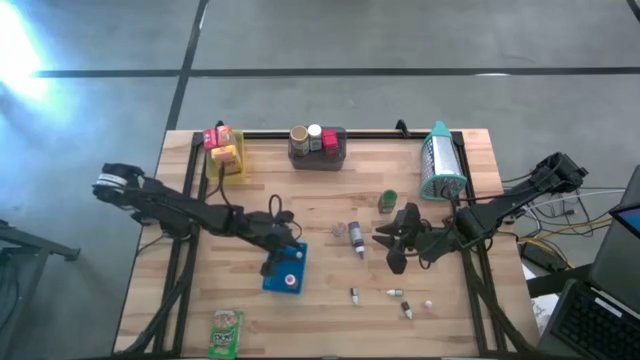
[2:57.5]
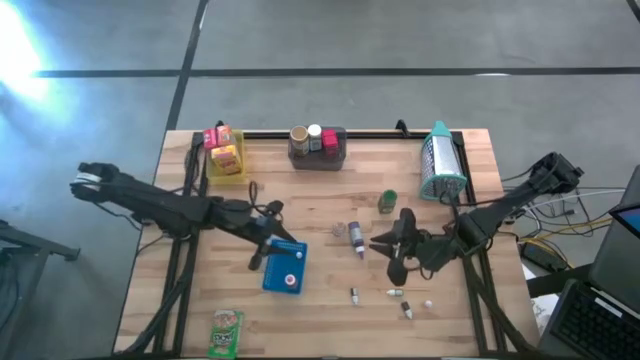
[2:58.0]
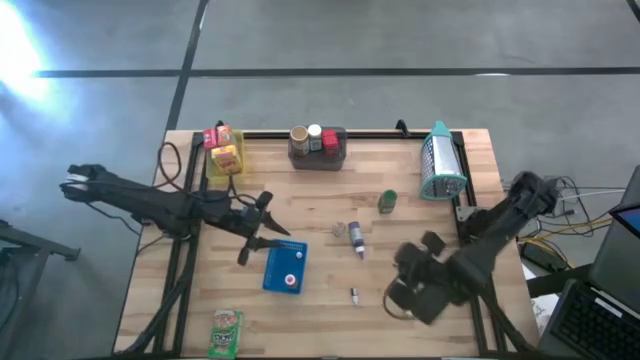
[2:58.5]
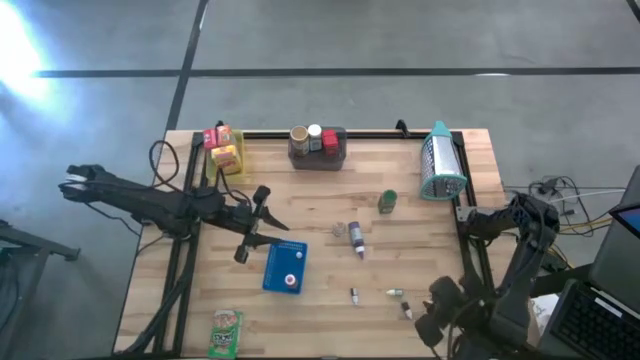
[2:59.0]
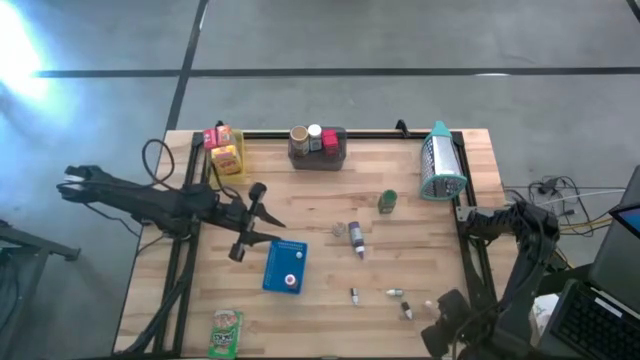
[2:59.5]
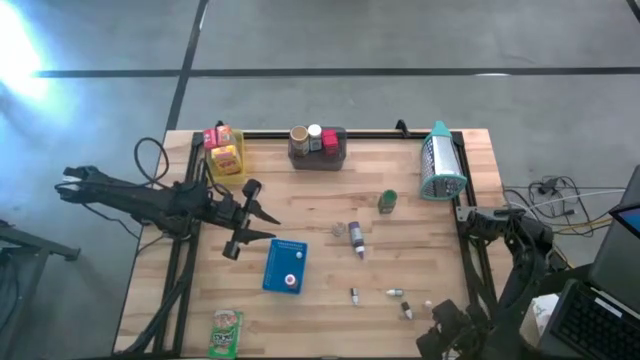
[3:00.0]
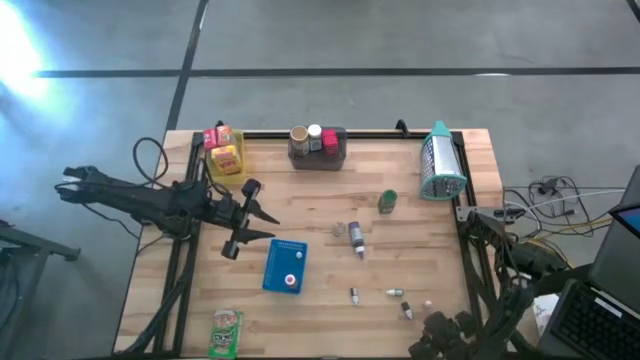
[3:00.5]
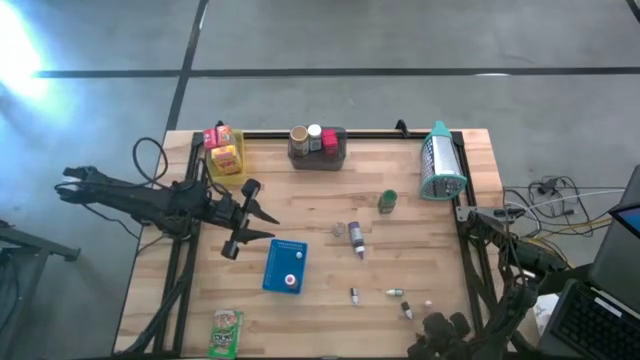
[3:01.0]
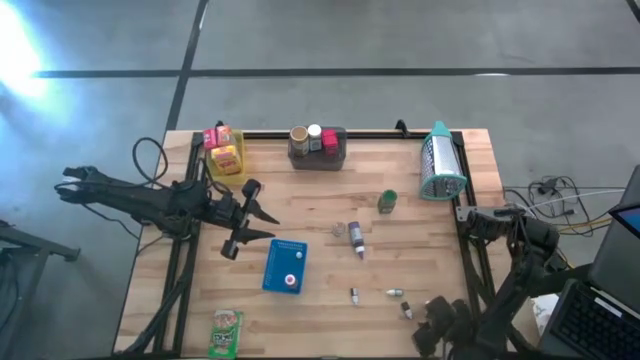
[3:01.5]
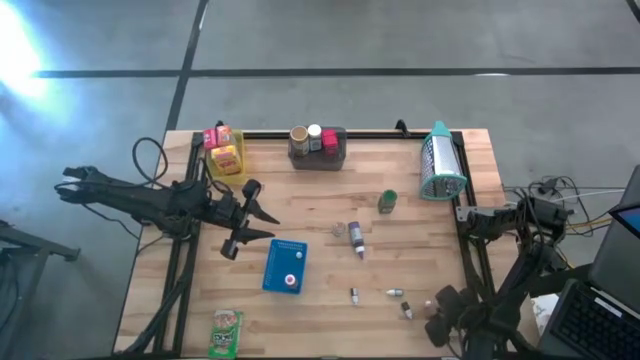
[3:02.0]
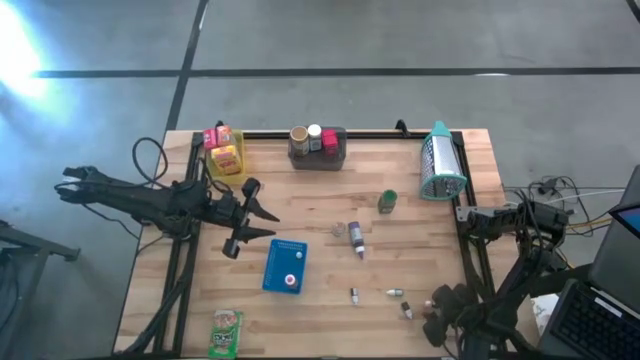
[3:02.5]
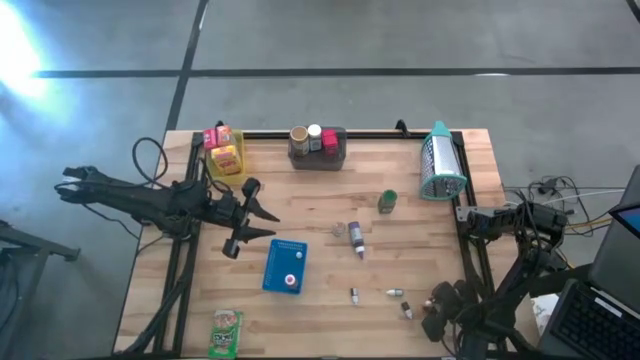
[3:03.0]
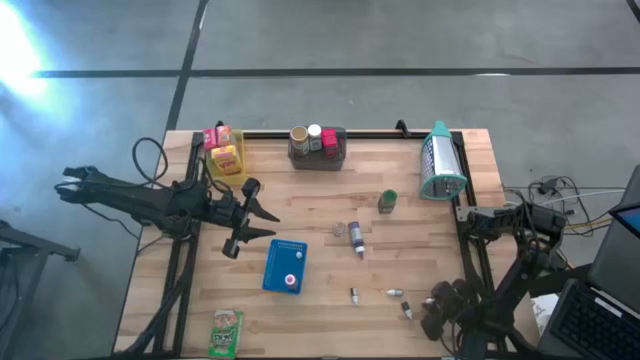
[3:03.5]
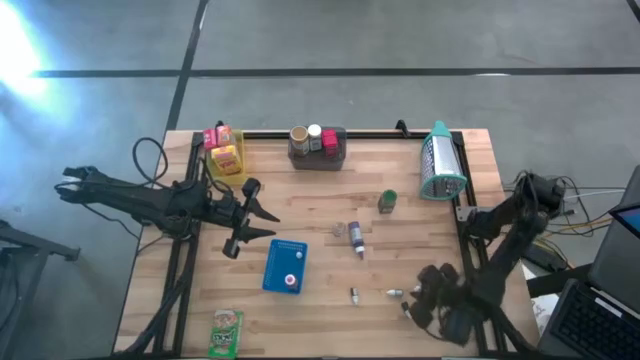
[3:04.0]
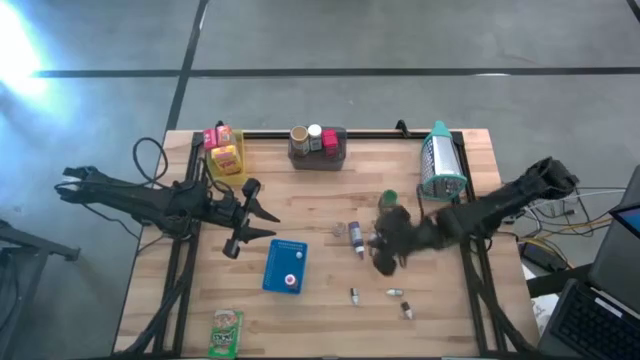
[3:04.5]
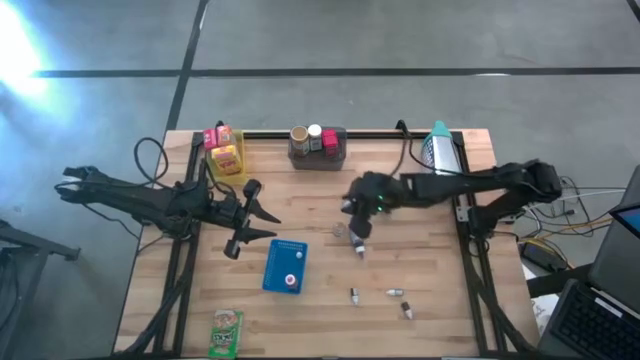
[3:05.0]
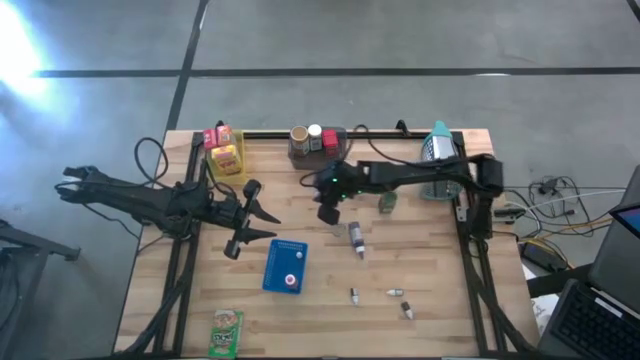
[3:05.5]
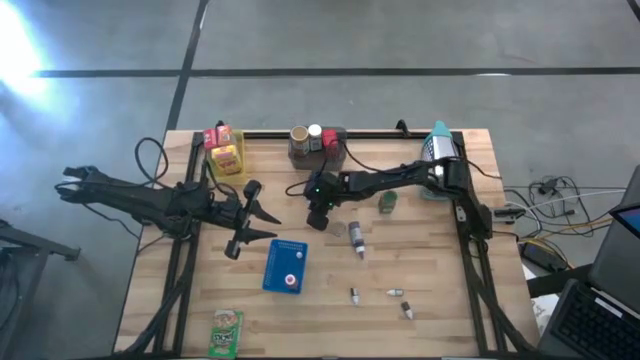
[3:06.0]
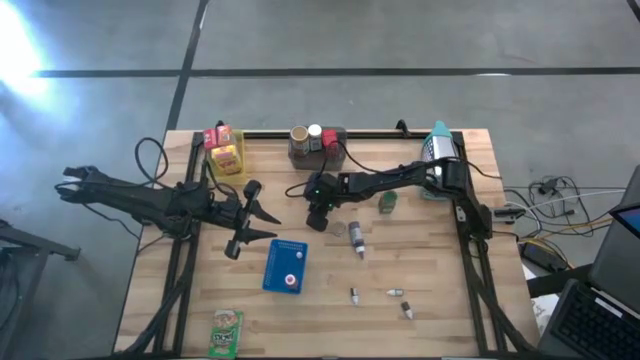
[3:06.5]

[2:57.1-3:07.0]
Task: Pick & Place Kitchen Items
Move the yellow food coloring on the center of the table

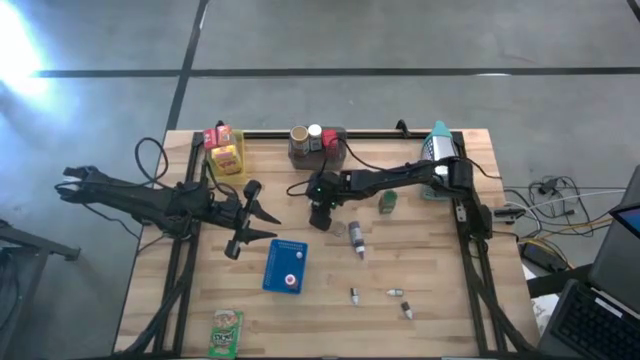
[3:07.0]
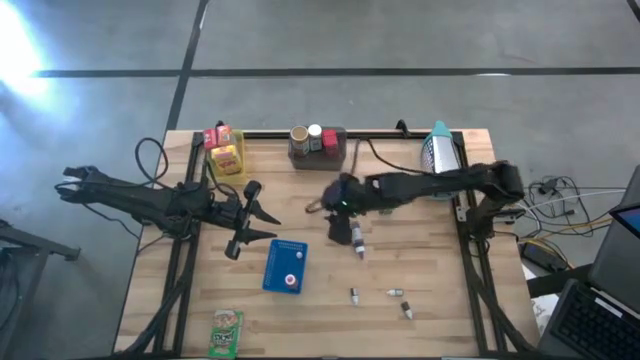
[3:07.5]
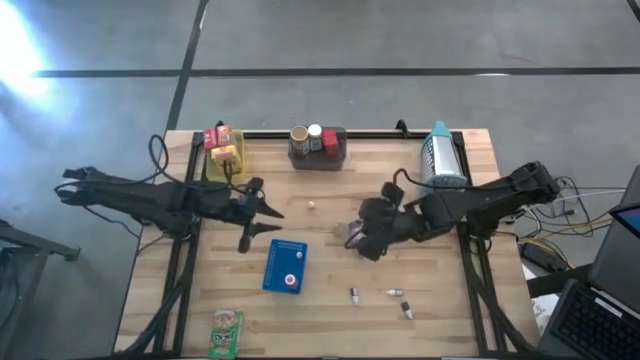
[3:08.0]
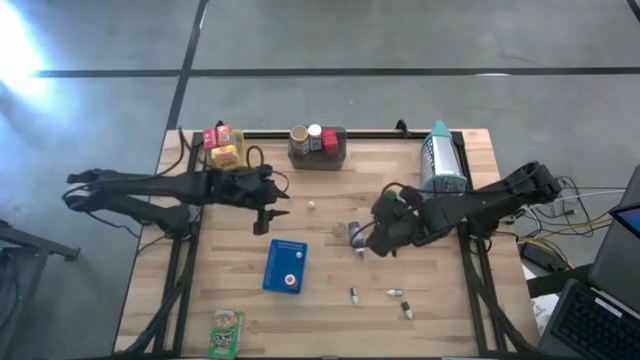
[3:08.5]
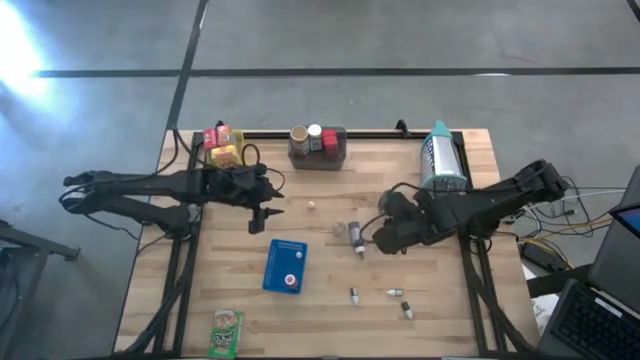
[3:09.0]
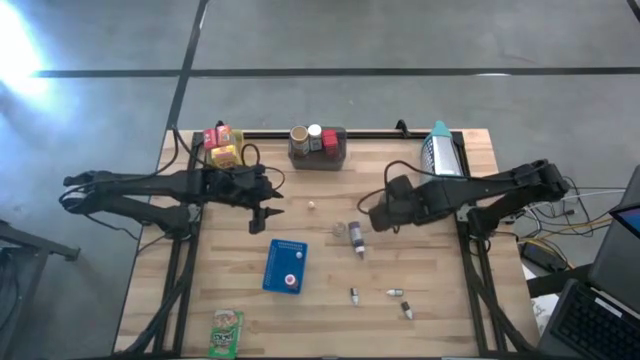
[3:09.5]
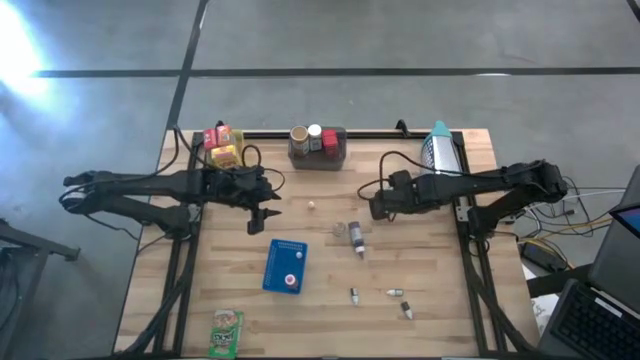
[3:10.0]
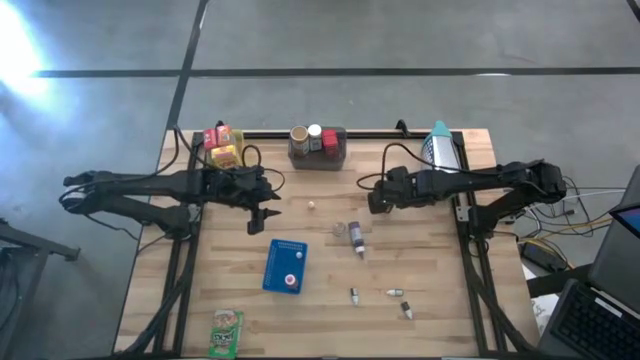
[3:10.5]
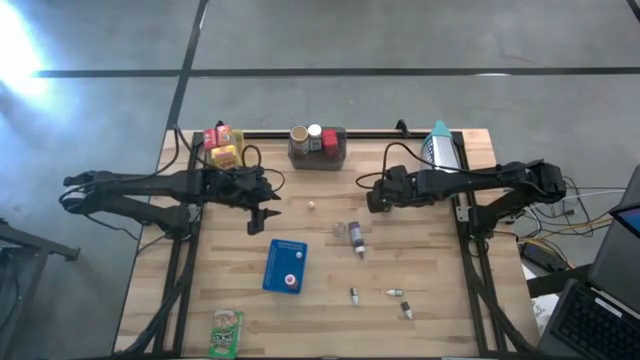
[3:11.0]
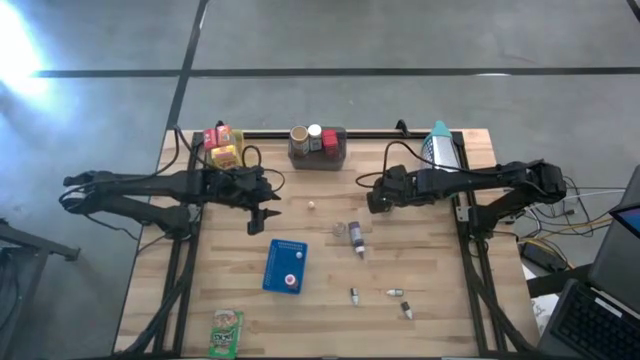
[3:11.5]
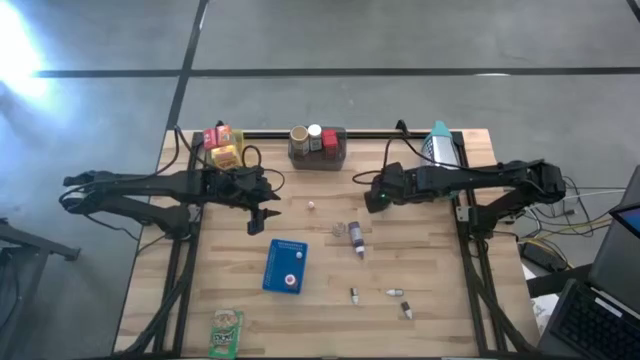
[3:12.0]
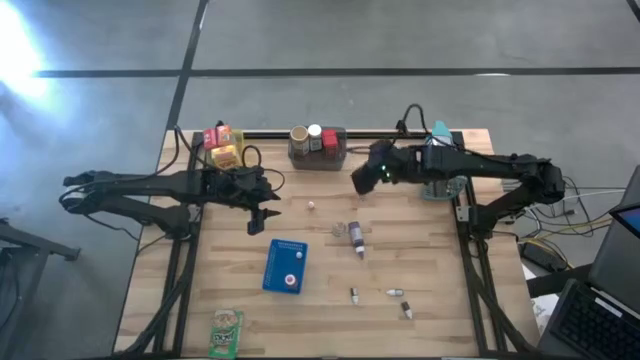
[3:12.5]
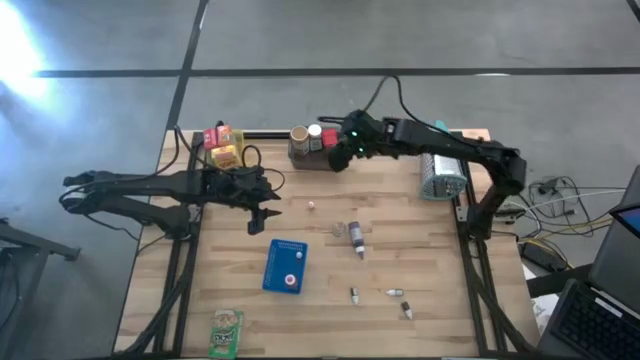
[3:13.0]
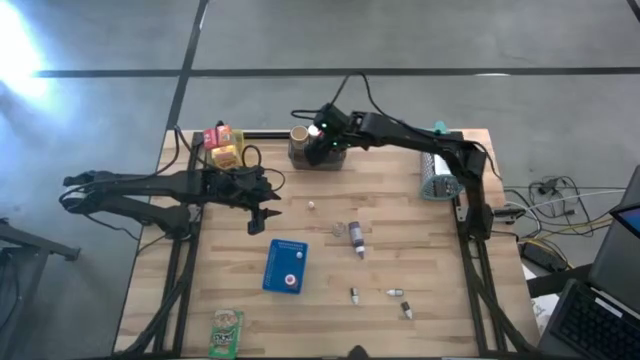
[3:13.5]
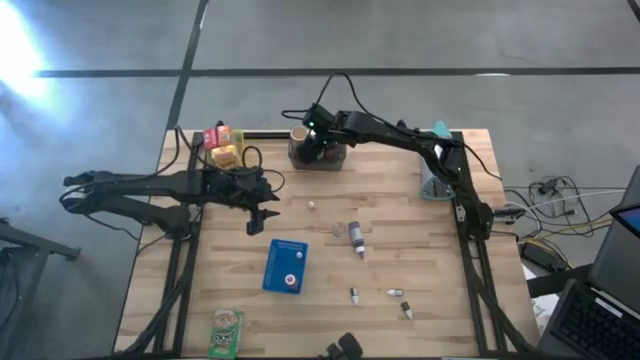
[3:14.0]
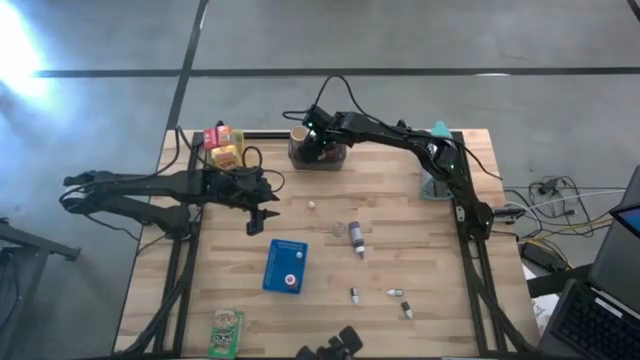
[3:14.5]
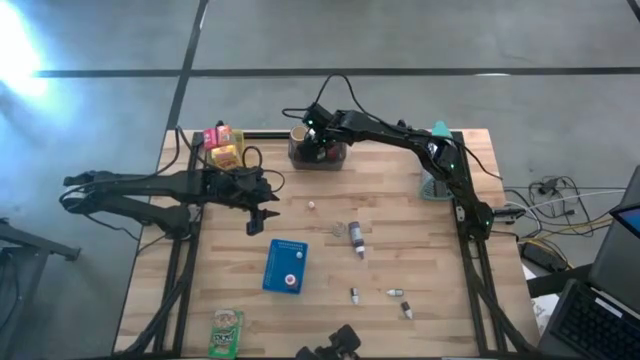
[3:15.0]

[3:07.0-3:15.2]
Put the green spice bottle into the black bin

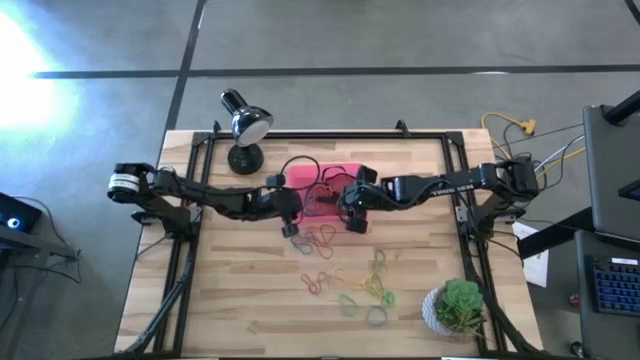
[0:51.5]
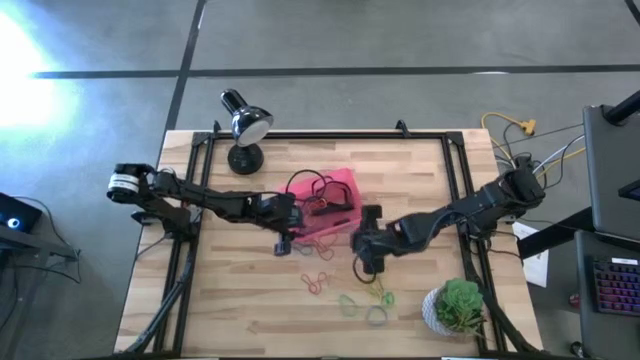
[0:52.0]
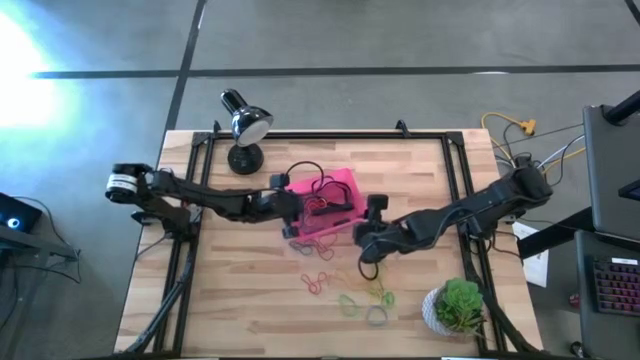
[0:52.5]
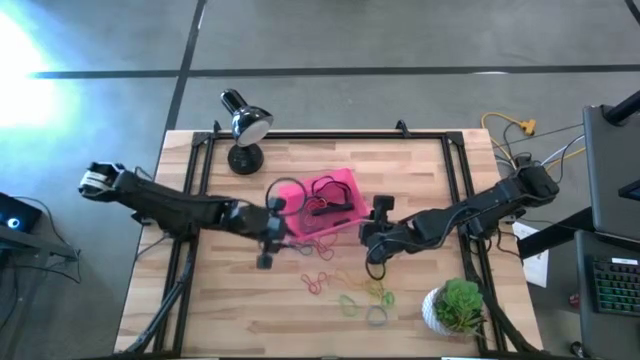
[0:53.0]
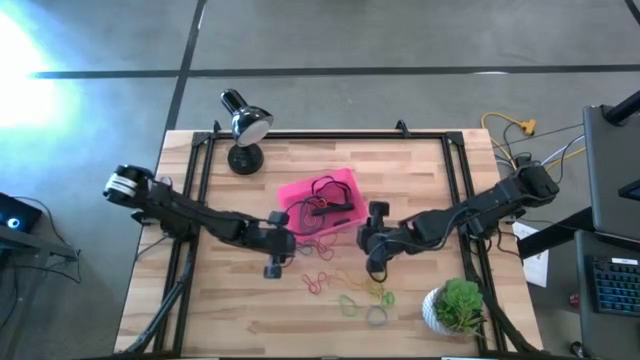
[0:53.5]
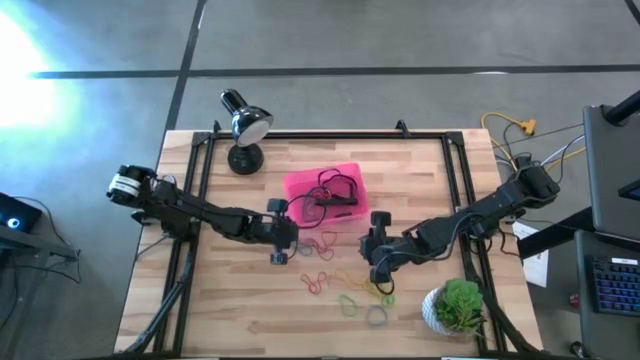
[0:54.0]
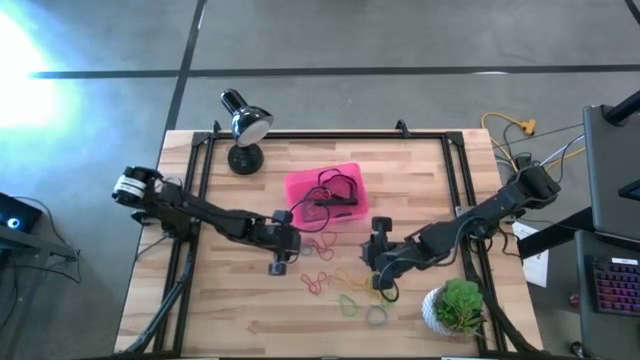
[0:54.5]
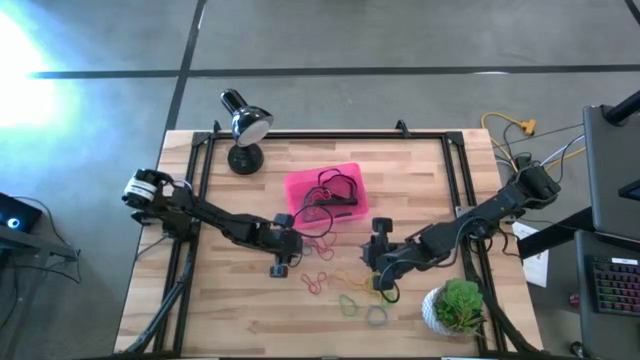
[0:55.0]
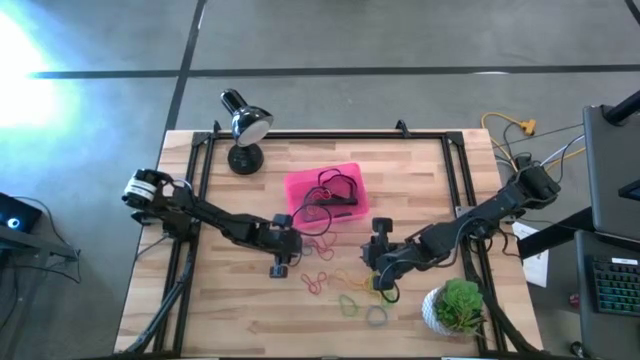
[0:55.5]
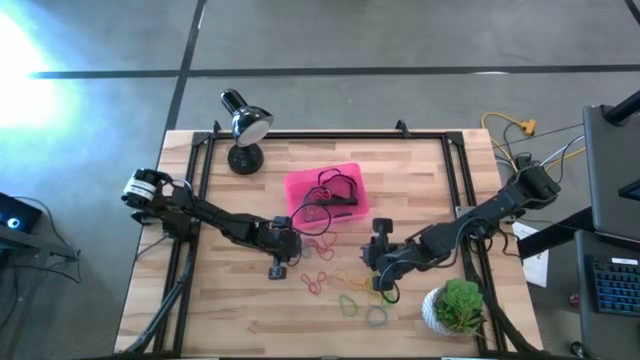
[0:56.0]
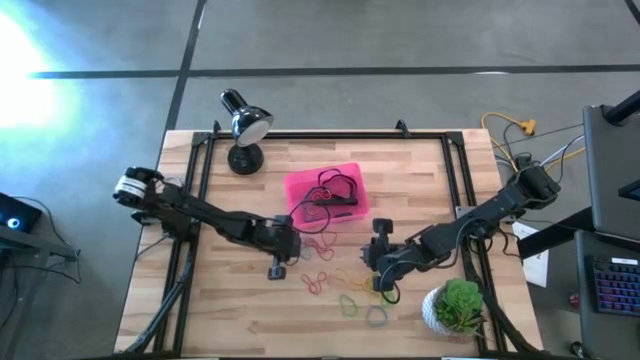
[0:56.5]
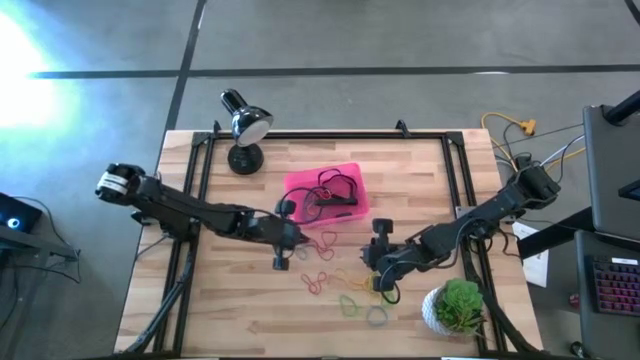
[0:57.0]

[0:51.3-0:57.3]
Task: Pick and place rubber bands into bin
Put the blue rubber band into the red bin
